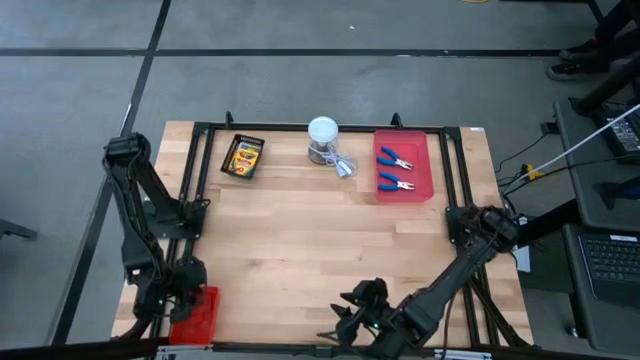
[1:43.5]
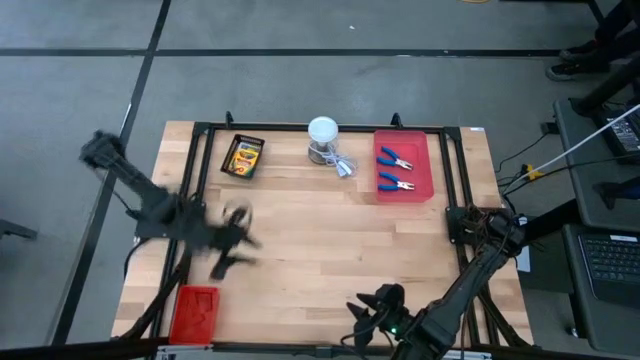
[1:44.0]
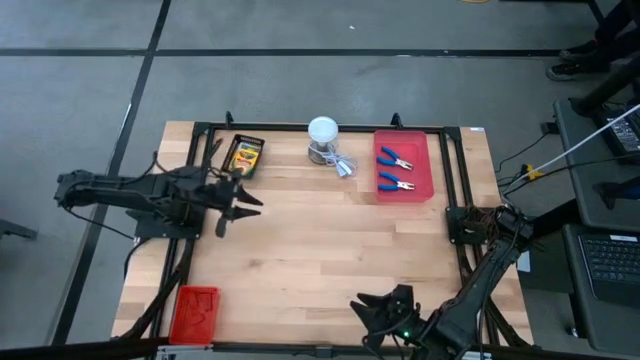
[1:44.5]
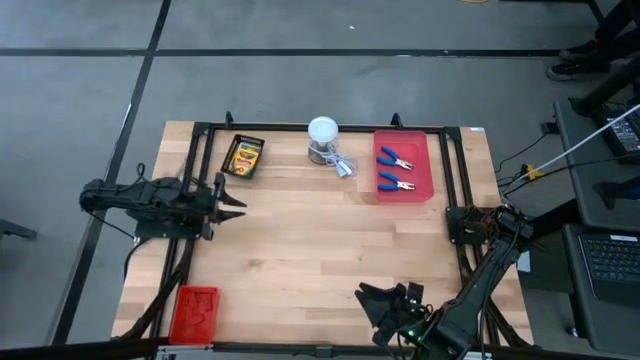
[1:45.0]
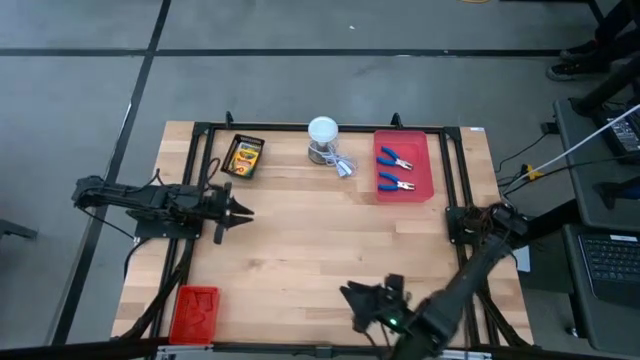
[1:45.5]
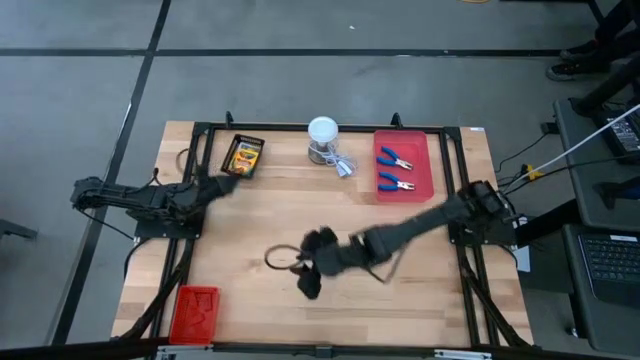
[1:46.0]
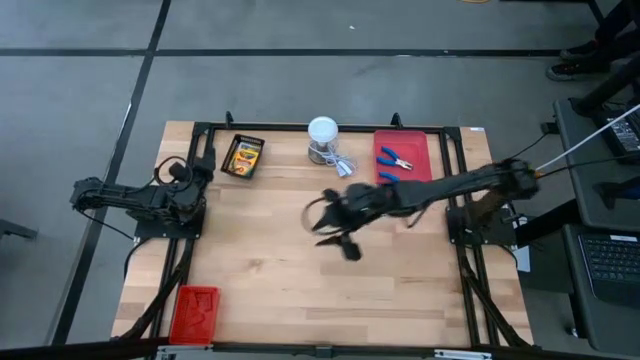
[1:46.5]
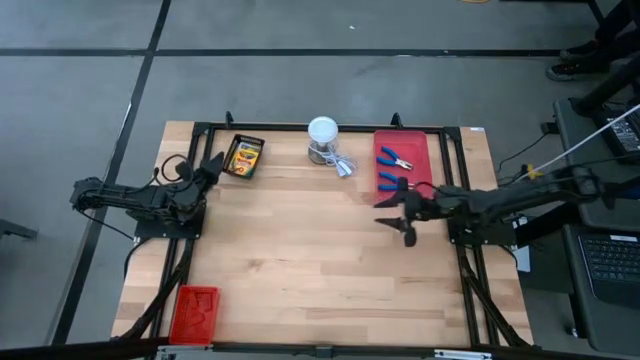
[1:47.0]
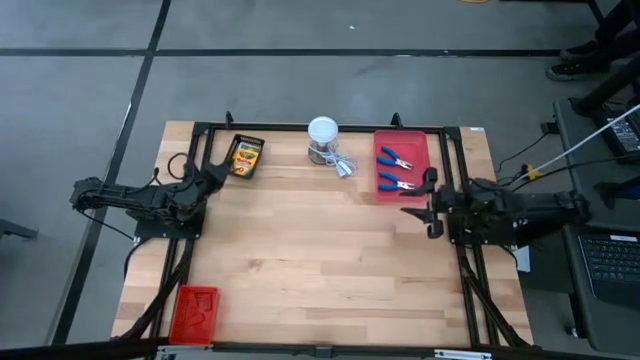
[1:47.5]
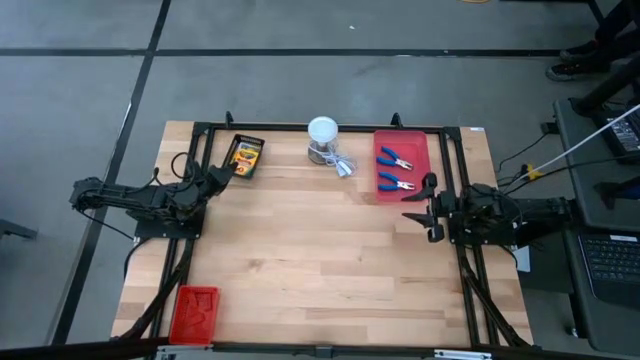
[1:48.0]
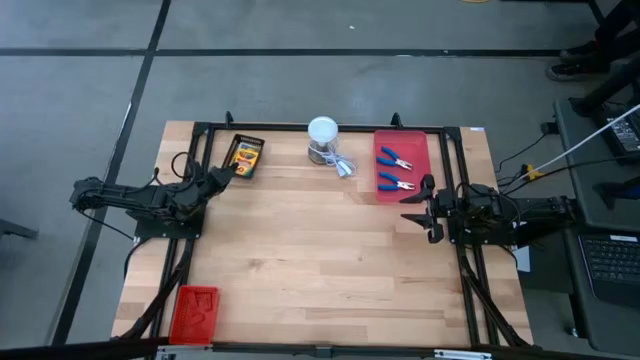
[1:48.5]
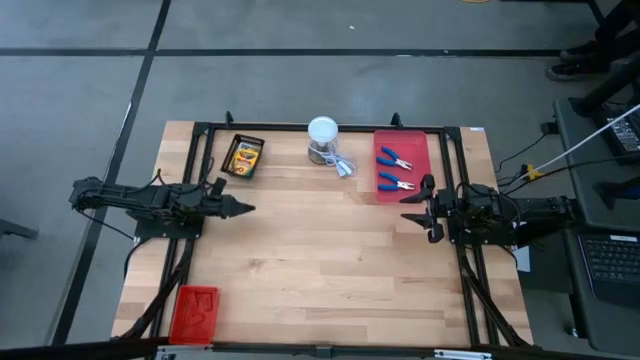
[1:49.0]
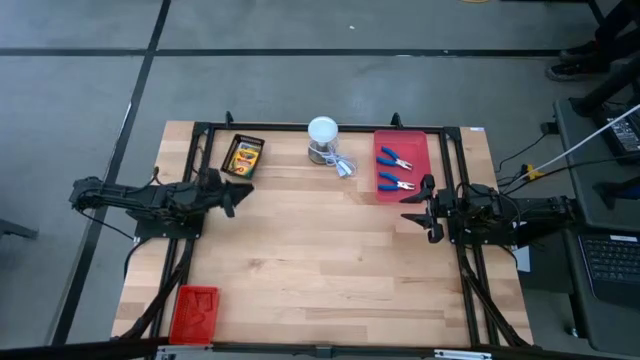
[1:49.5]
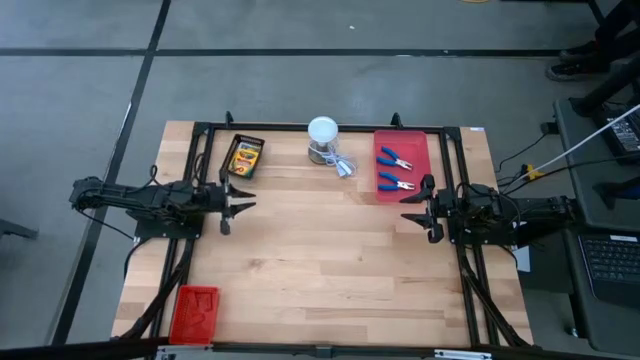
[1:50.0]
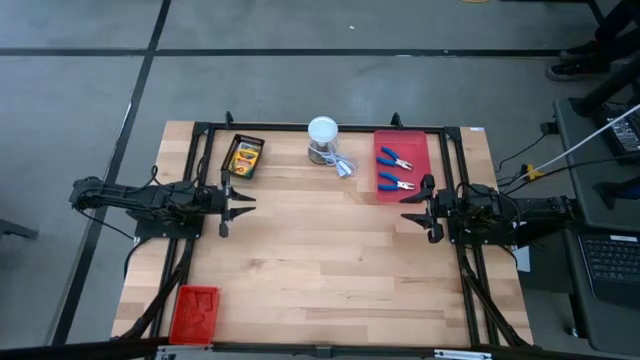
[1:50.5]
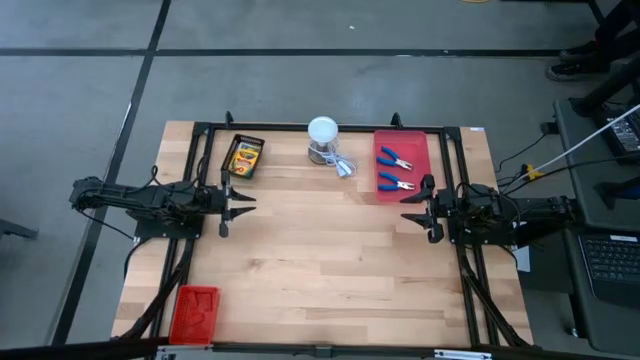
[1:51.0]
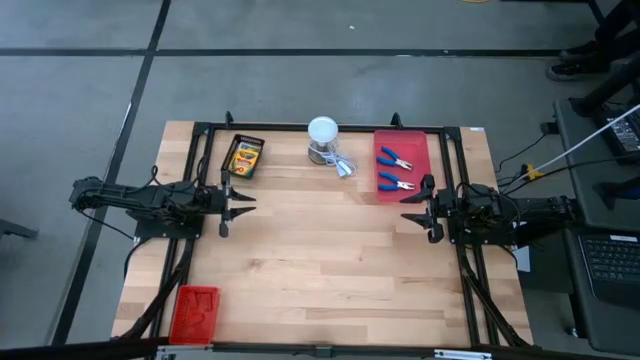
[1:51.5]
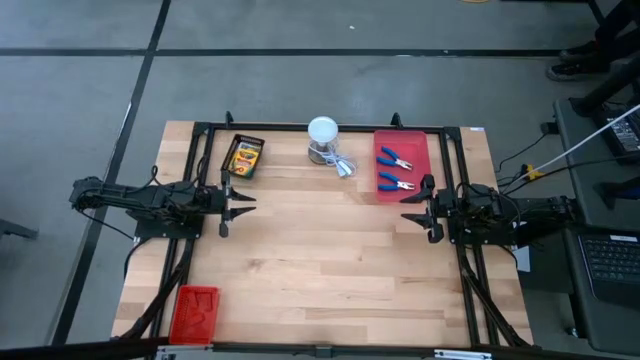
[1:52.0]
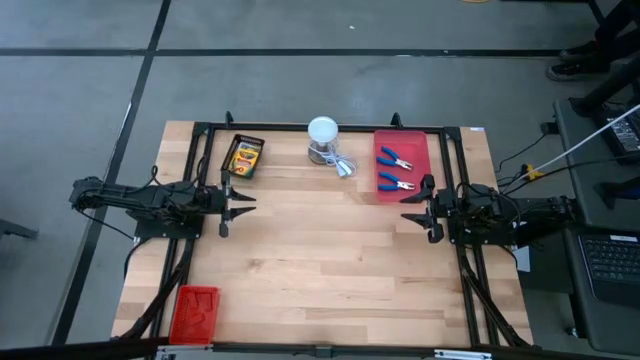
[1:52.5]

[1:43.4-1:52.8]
Task: Pick & Place School Supplies
Return to Home Position

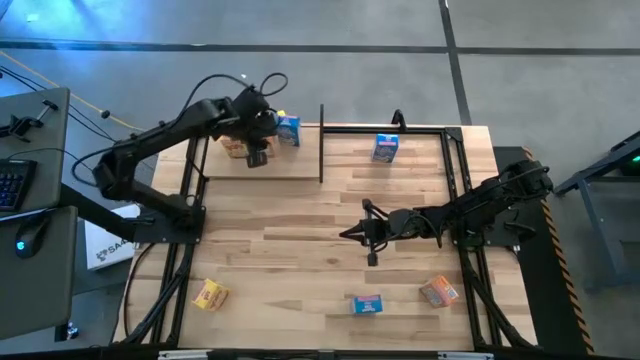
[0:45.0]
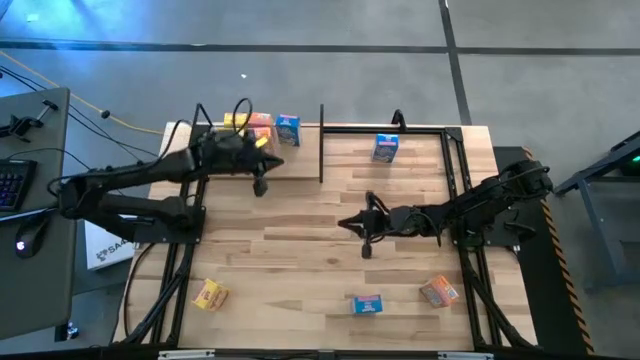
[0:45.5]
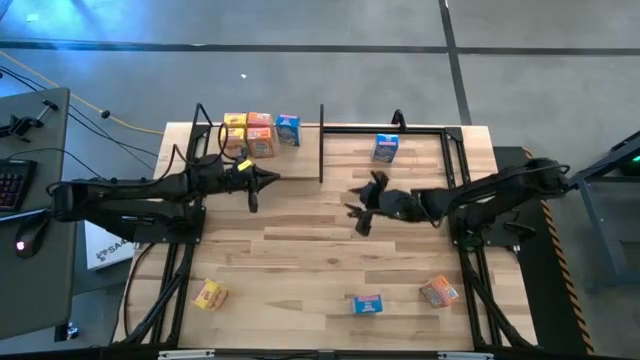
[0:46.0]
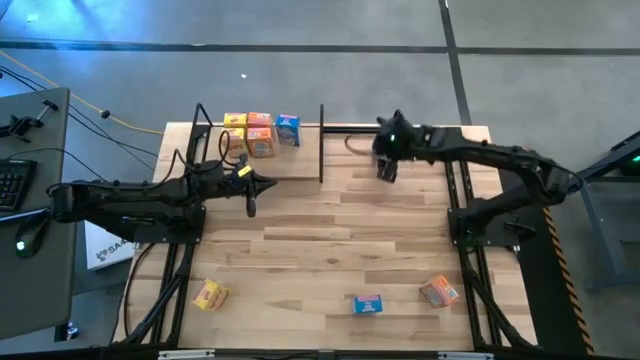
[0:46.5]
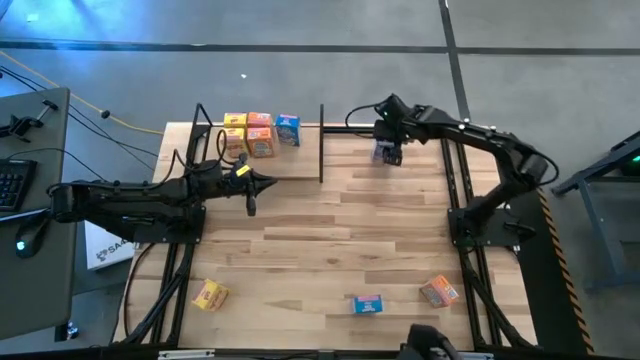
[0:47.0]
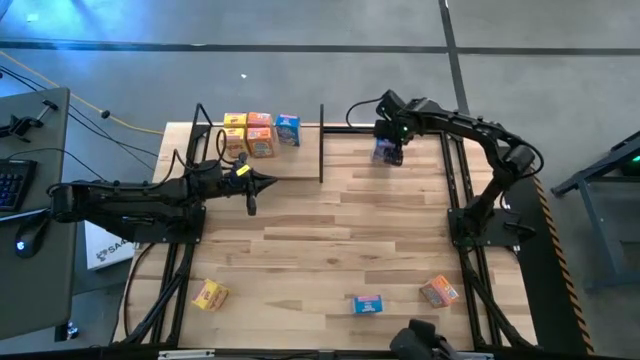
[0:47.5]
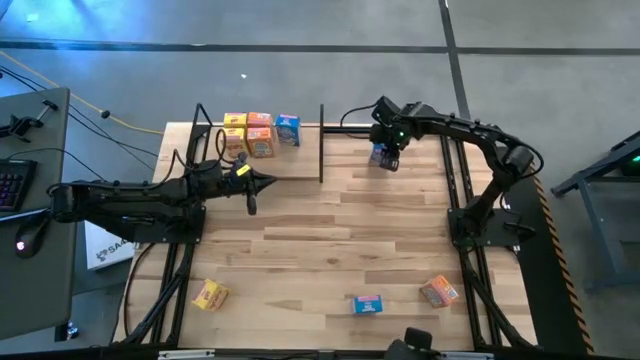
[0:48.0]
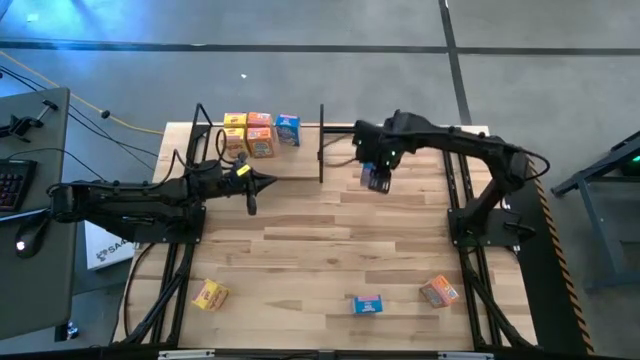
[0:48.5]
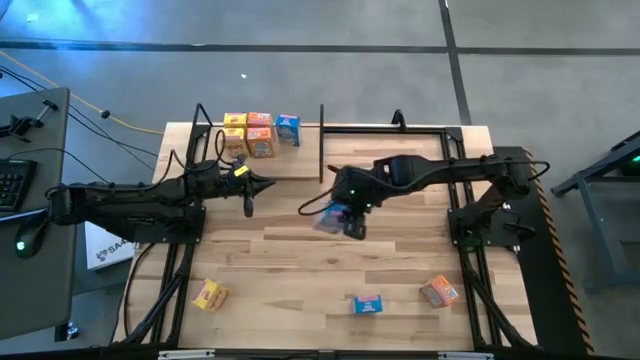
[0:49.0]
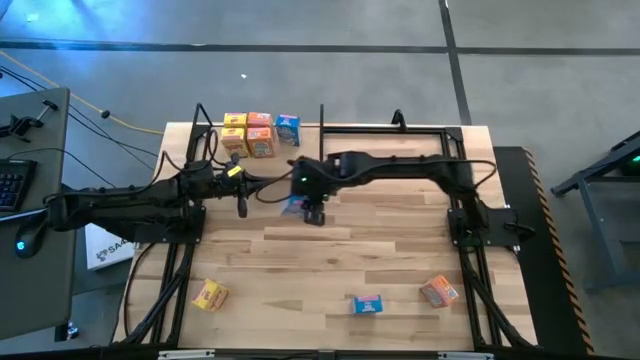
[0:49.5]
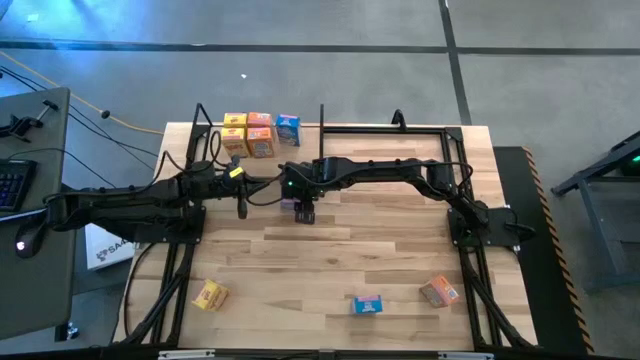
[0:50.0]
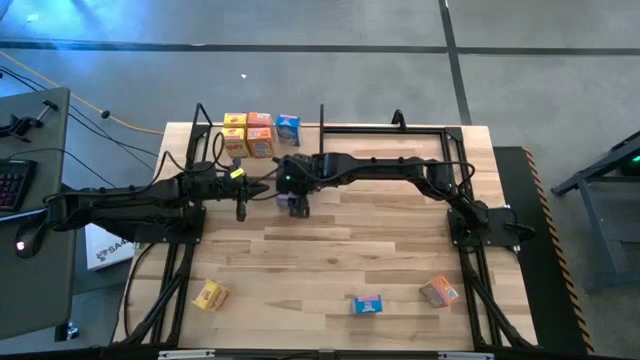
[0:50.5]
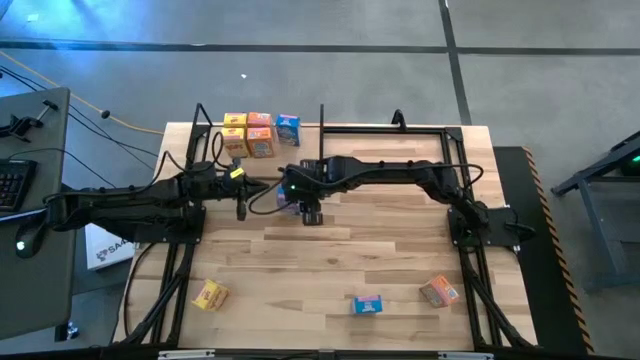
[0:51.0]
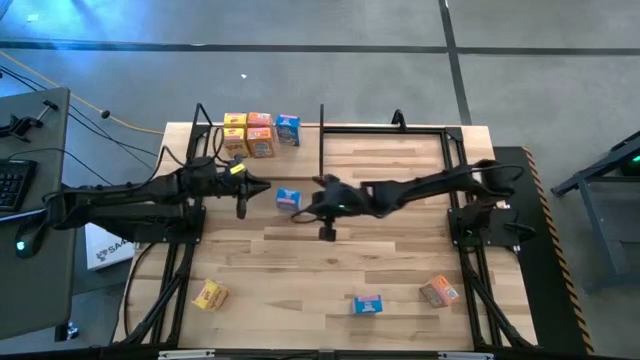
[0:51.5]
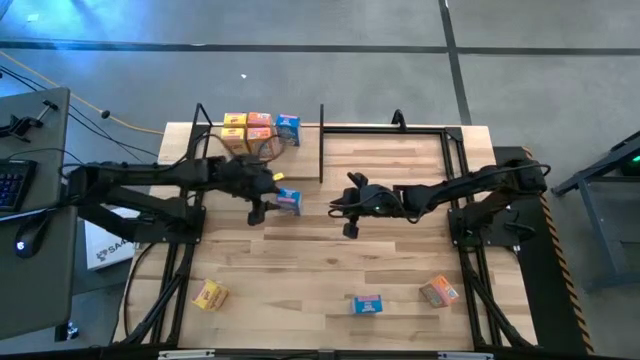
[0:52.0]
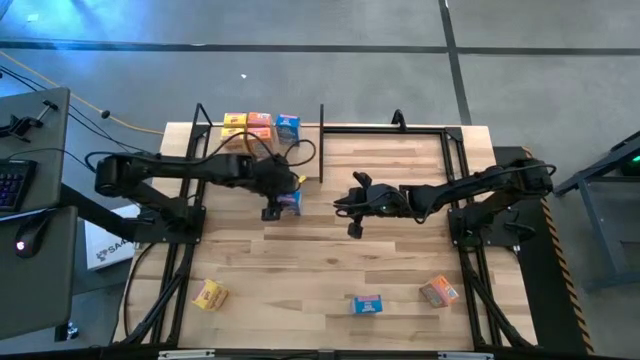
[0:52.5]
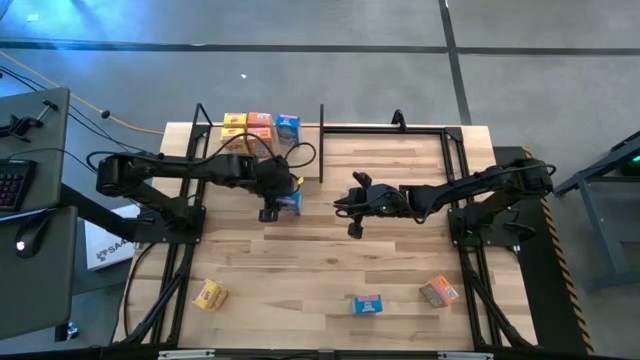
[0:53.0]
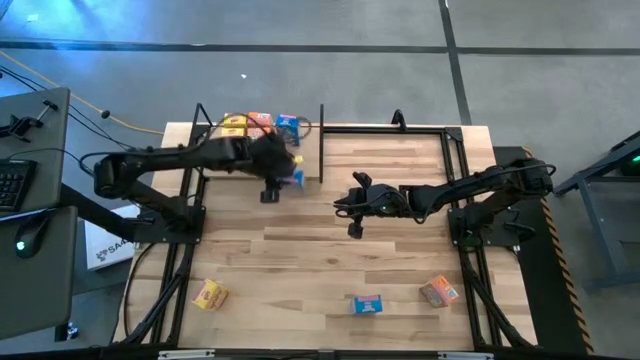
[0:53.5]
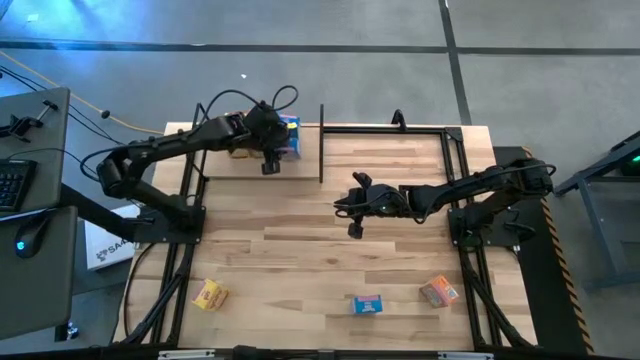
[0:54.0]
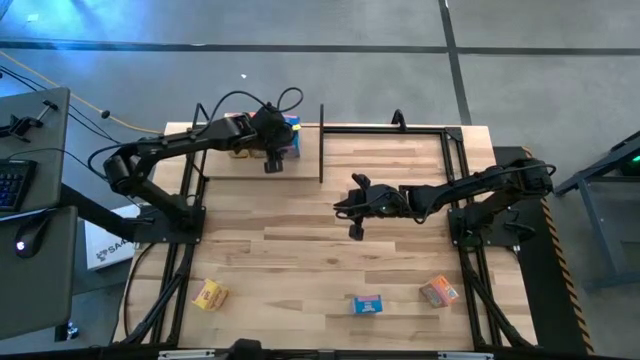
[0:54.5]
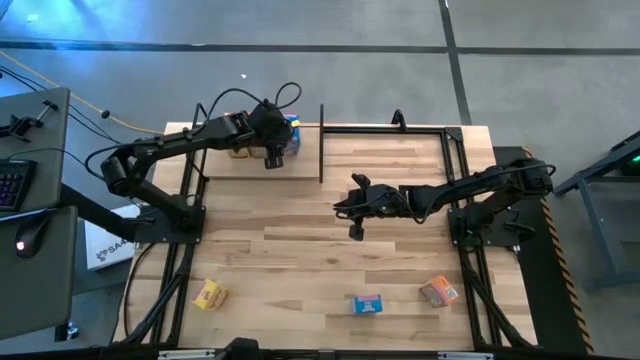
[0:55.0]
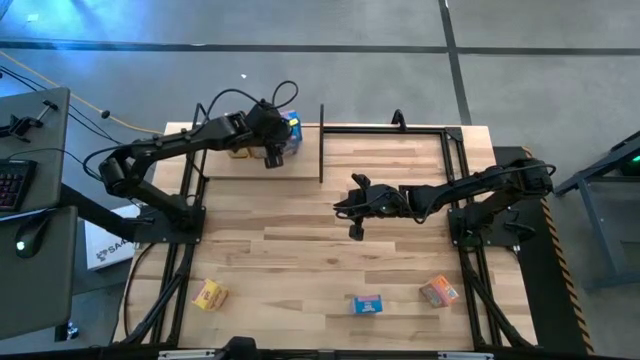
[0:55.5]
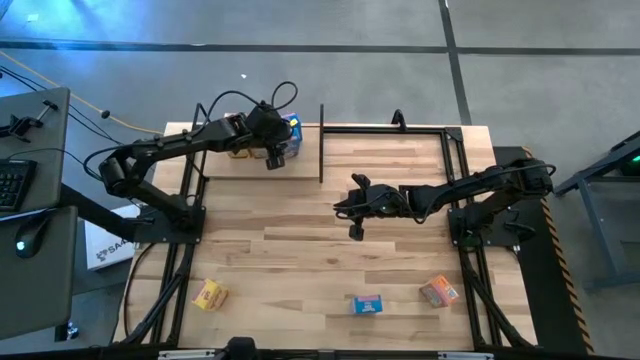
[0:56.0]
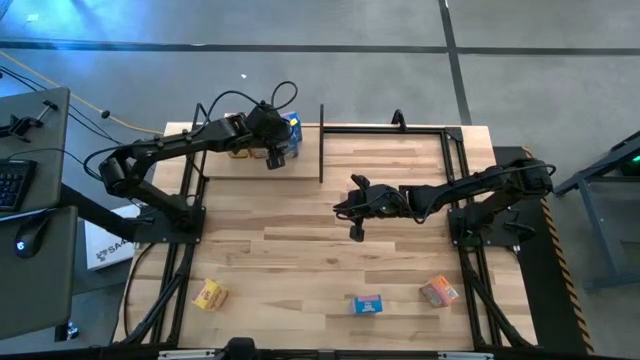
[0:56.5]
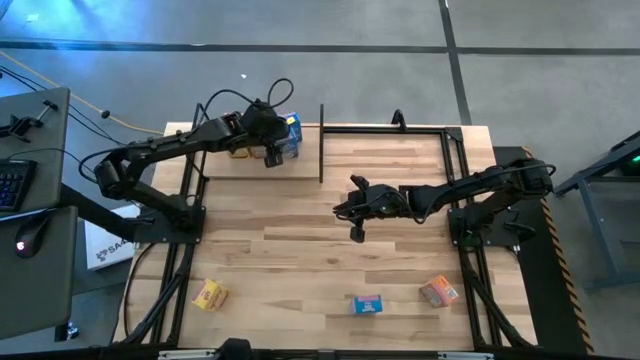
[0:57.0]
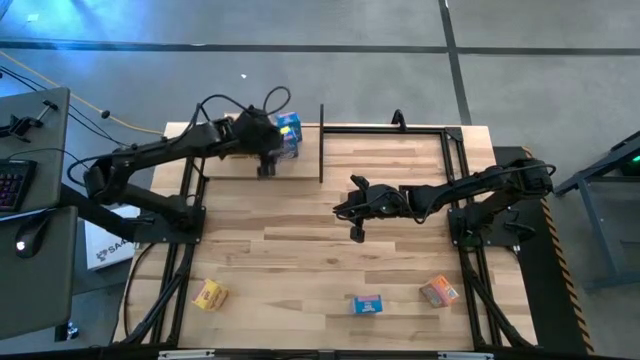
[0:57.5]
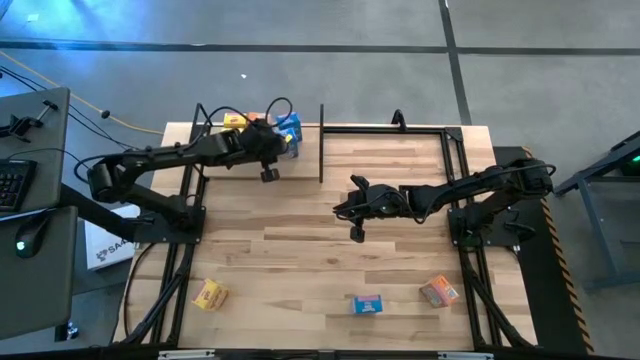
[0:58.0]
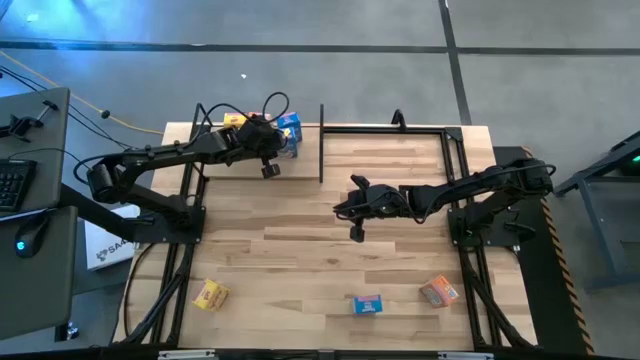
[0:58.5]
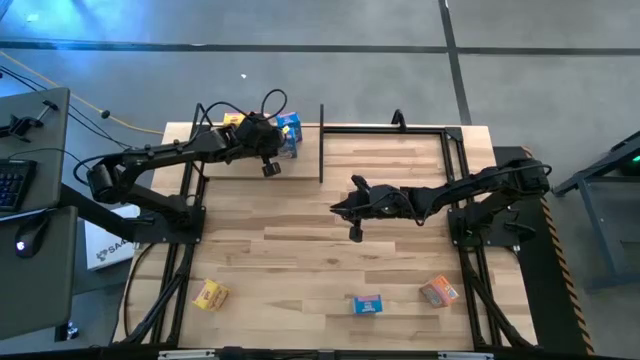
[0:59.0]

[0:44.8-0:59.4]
Task: Stack cereal on shelf
Put the top blue cereal box on the shelf aligned with the other blue cereal box
